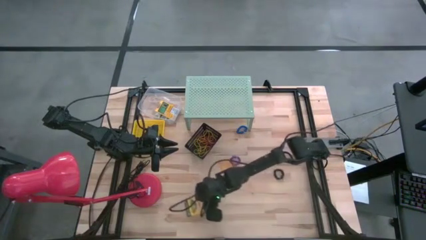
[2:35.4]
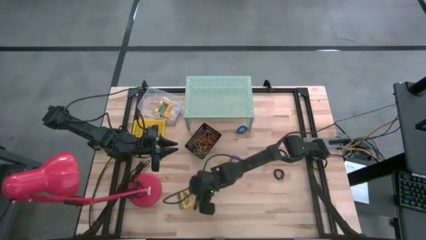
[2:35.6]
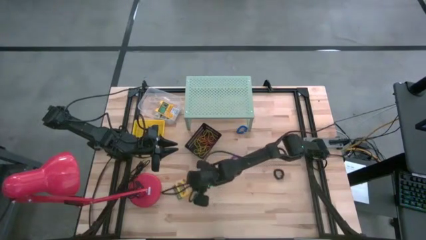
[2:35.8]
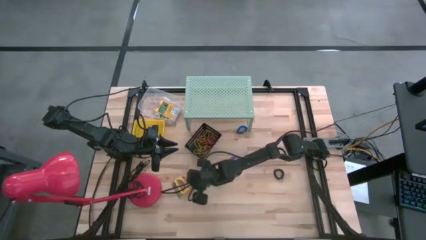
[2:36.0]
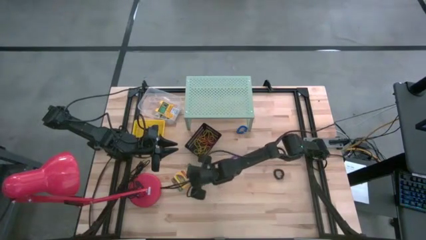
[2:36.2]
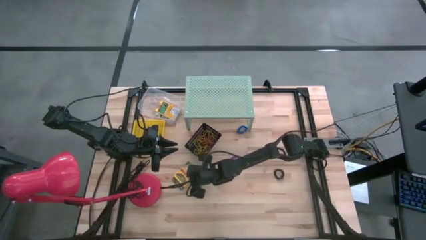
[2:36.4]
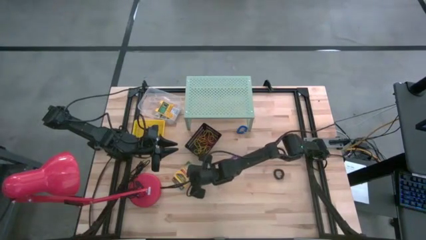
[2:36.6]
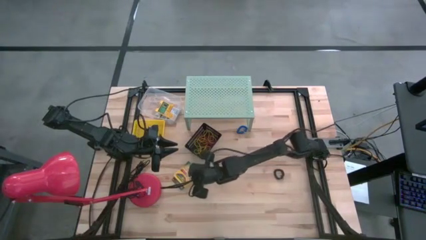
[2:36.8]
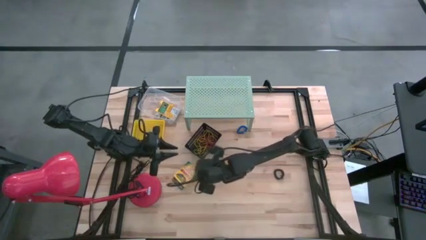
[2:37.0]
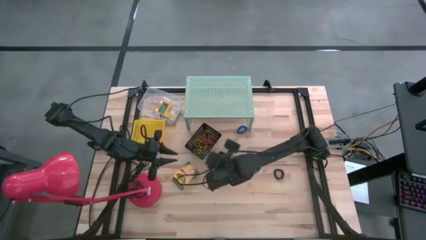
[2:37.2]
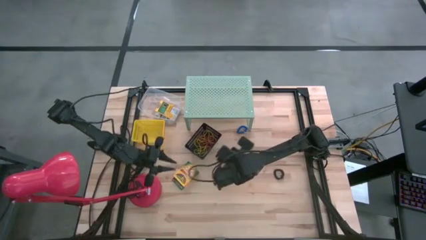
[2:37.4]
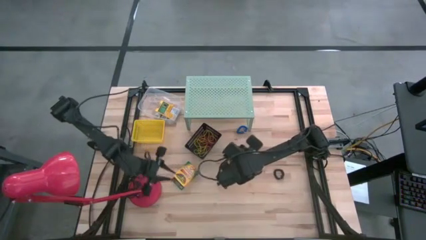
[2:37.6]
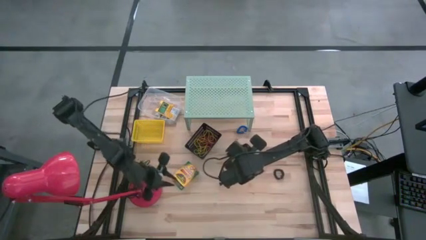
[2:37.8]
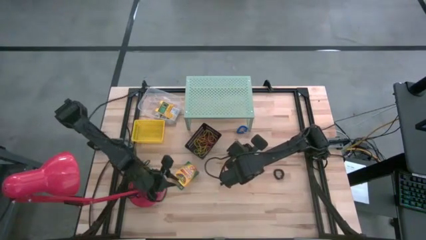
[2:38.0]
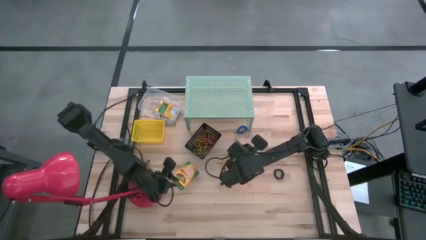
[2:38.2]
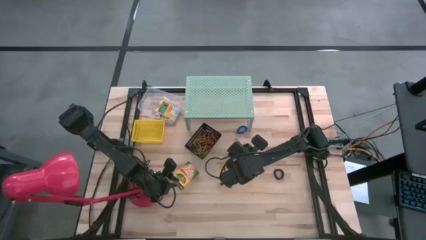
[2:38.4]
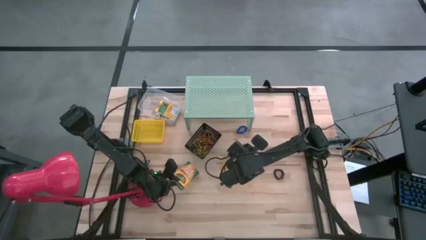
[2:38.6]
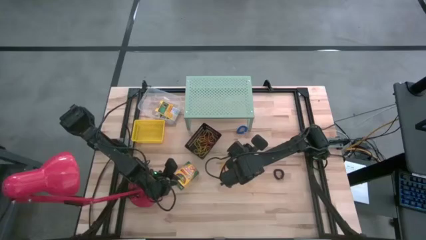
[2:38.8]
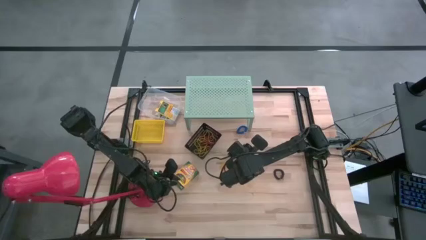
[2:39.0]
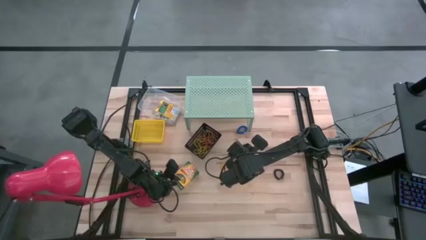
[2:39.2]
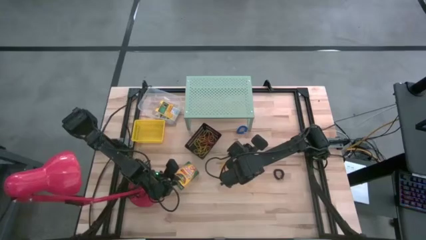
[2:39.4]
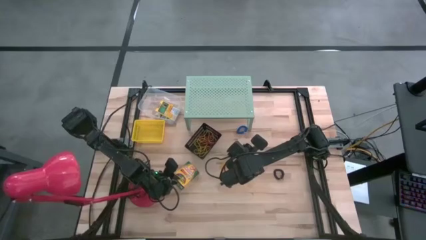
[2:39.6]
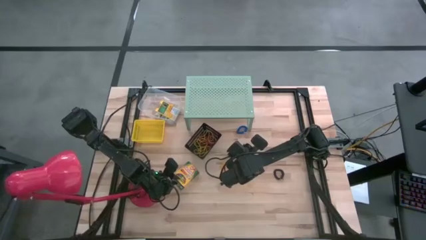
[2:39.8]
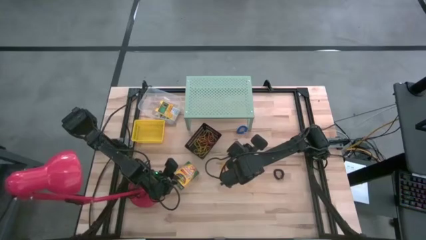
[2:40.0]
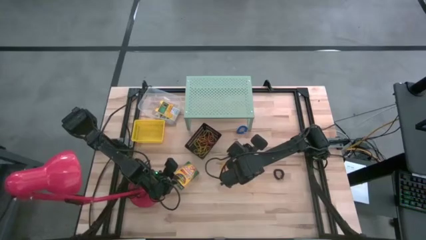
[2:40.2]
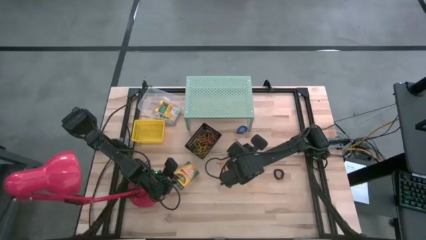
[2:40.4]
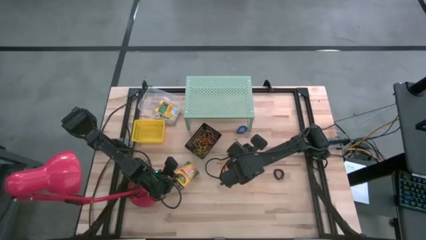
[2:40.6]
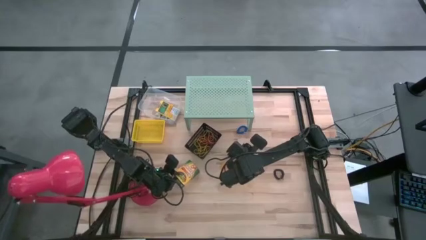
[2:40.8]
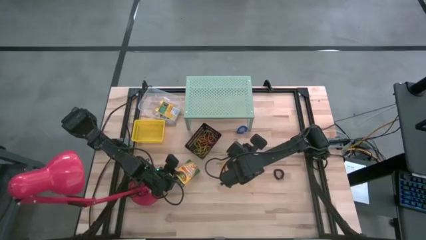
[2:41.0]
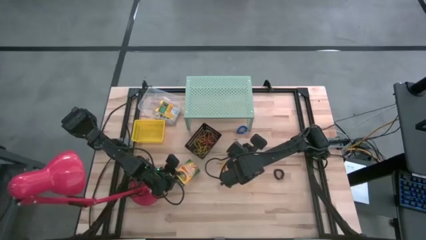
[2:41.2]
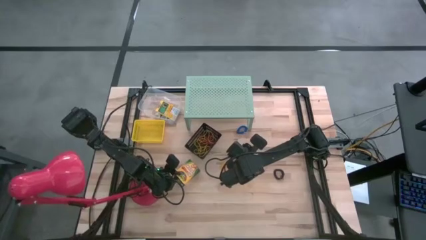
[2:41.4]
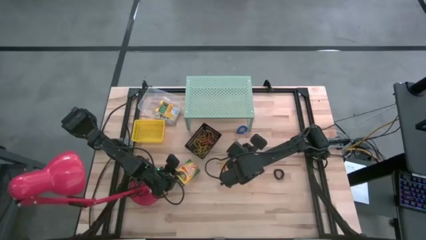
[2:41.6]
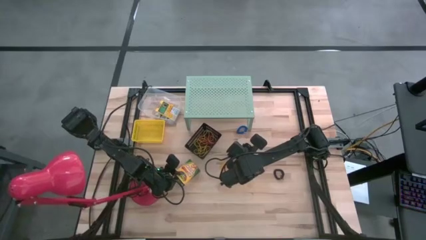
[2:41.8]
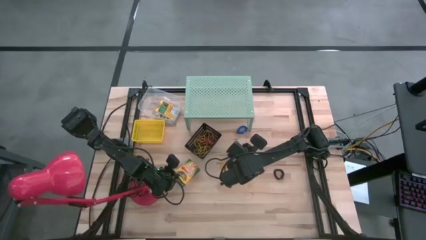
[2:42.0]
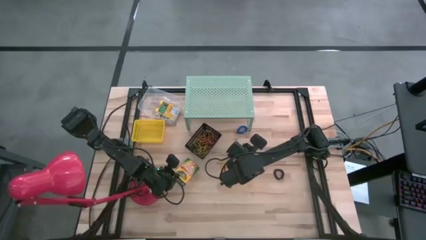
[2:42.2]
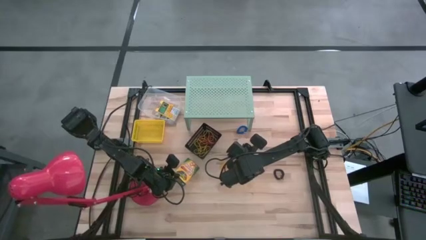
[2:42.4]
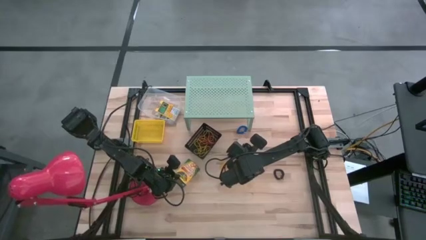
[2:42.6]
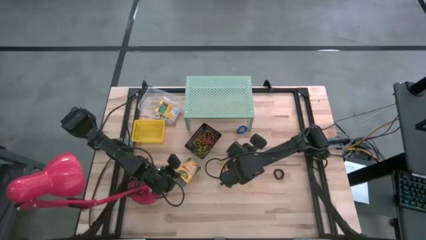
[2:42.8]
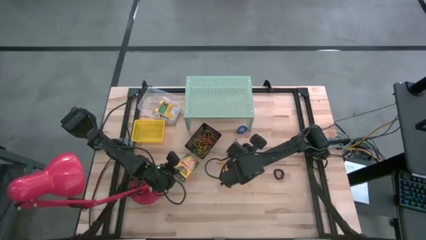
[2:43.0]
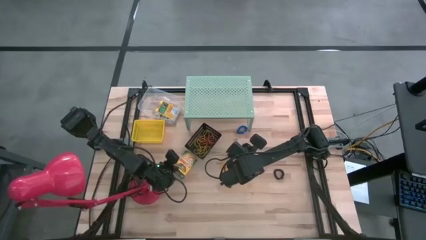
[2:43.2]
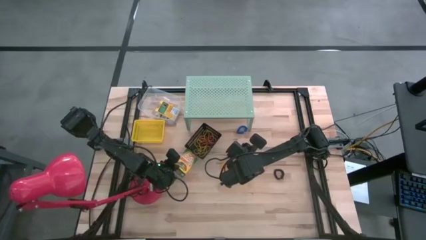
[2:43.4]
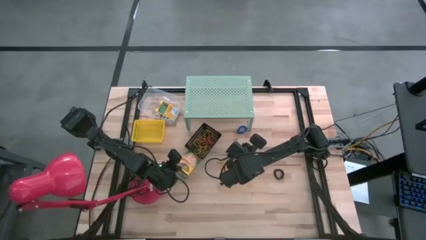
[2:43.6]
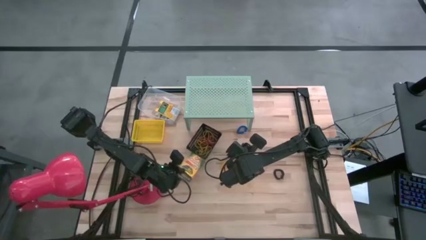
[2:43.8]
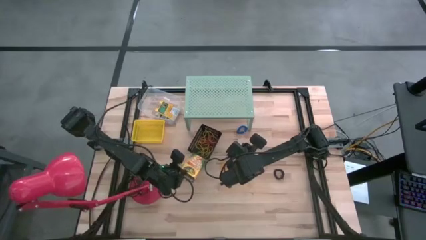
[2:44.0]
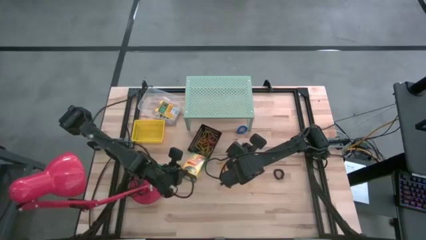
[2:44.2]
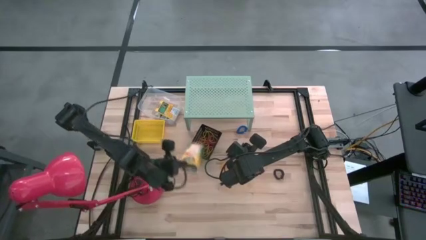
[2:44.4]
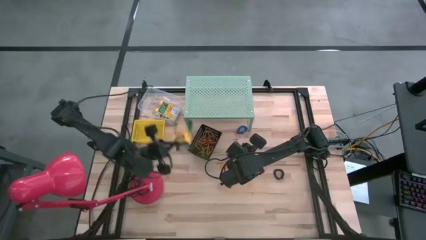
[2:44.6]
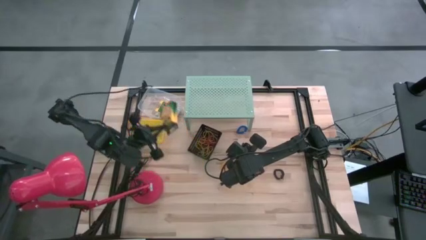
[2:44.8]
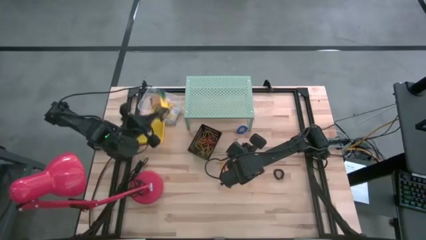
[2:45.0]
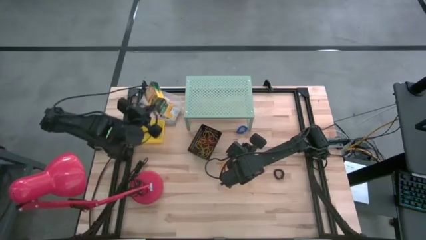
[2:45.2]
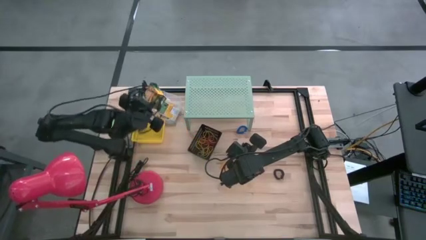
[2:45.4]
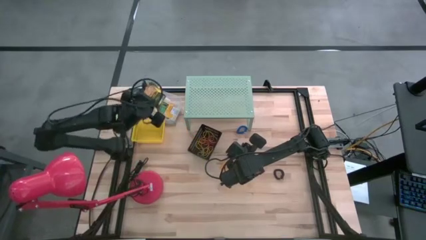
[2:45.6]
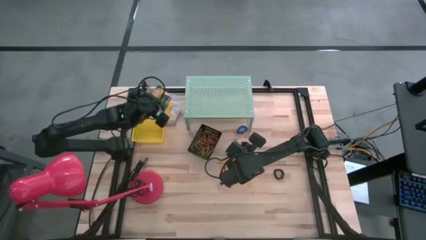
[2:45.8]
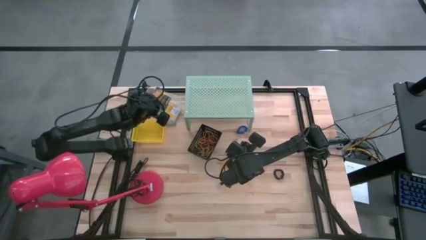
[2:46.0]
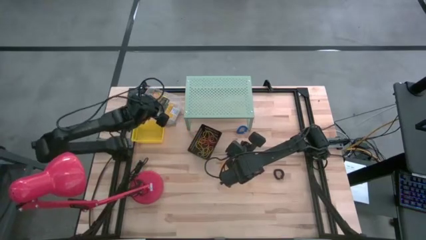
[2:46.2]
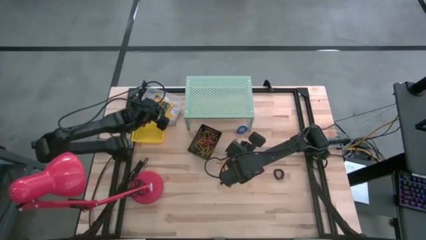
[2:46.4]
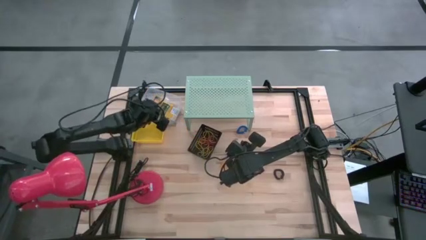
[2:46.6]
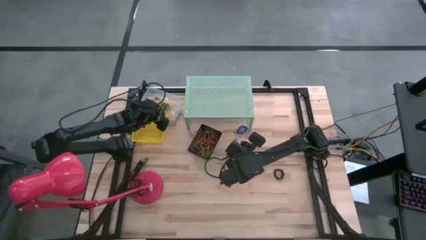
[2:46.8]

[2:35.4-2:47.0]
Task: Pick & Place Office Desk Supplies
Put the big crayon box into the transparent bin
